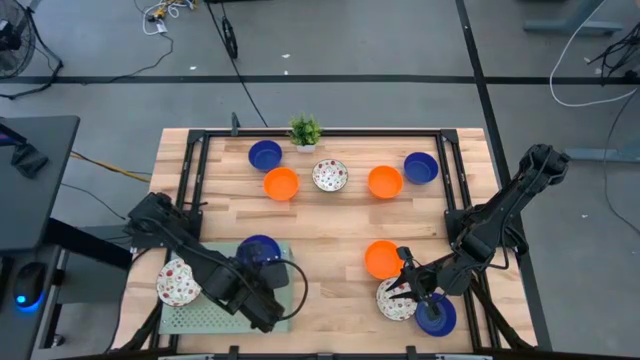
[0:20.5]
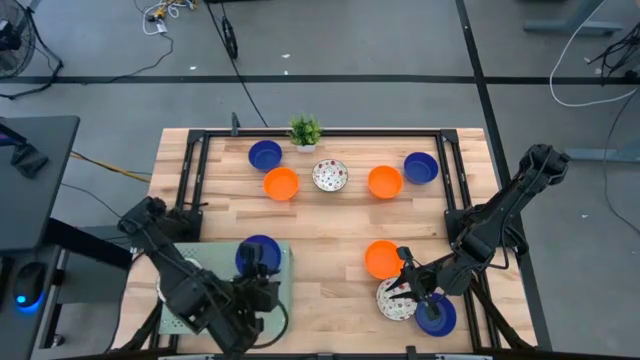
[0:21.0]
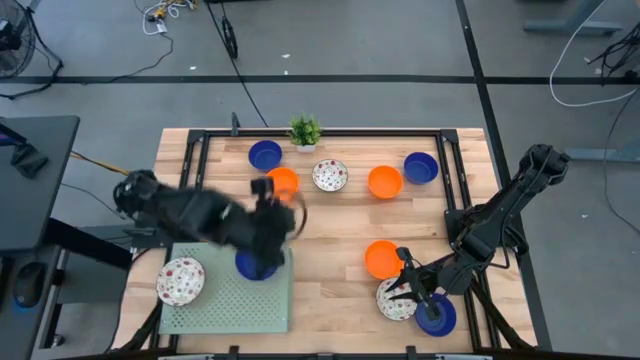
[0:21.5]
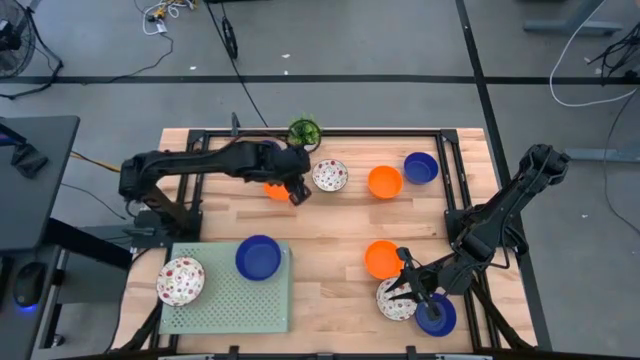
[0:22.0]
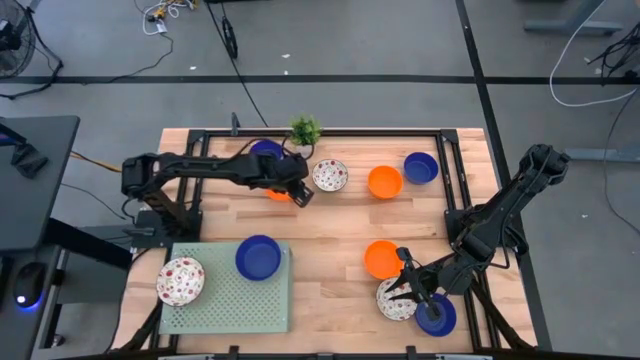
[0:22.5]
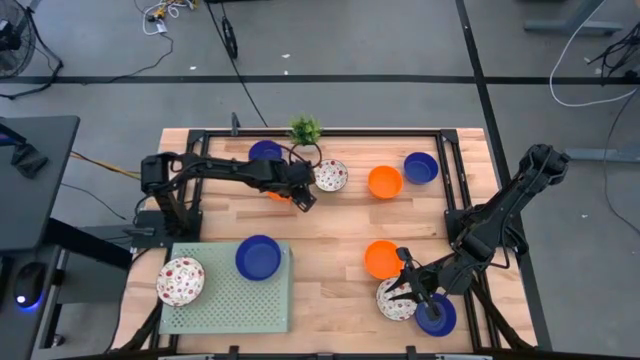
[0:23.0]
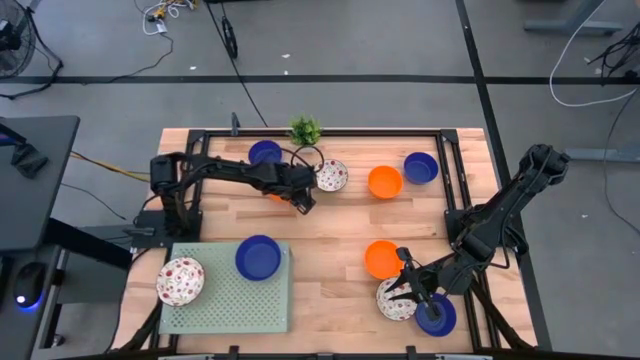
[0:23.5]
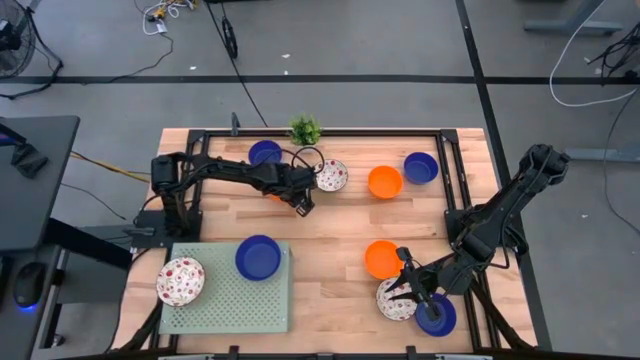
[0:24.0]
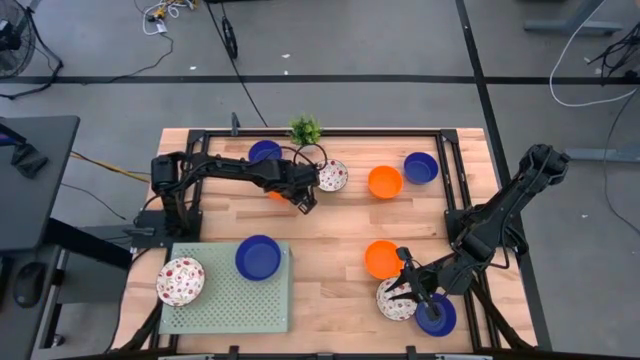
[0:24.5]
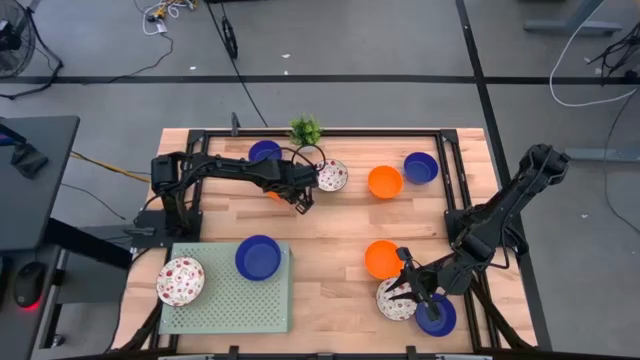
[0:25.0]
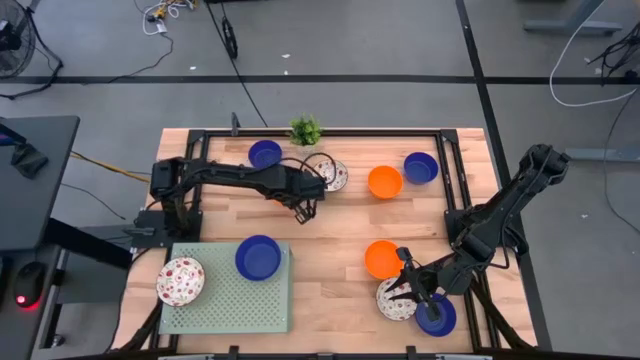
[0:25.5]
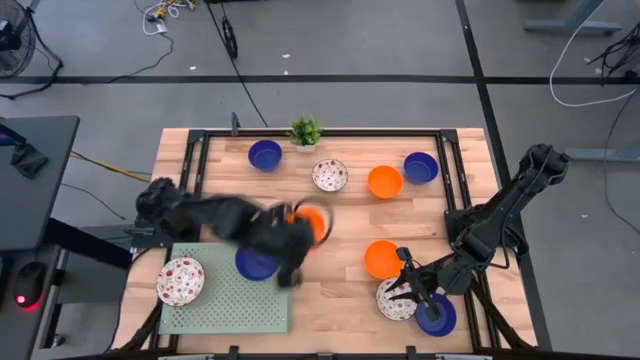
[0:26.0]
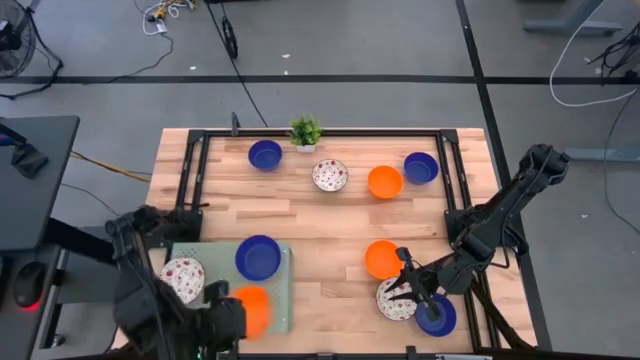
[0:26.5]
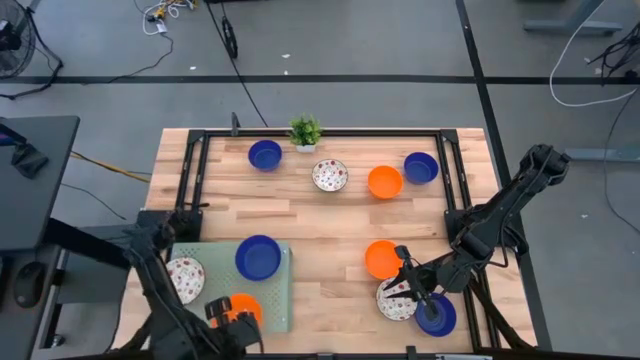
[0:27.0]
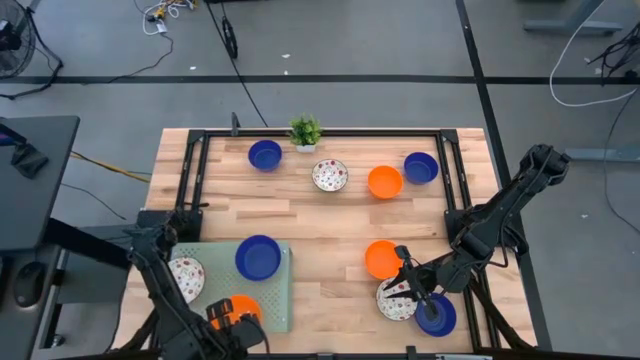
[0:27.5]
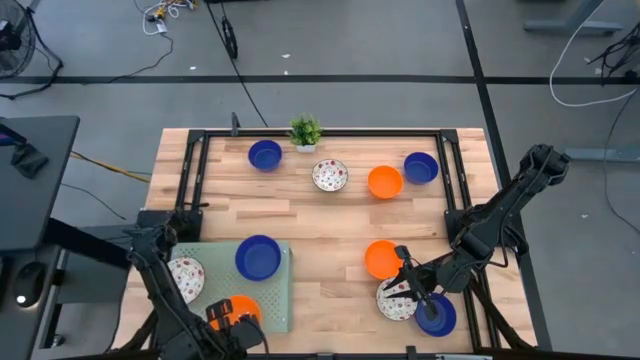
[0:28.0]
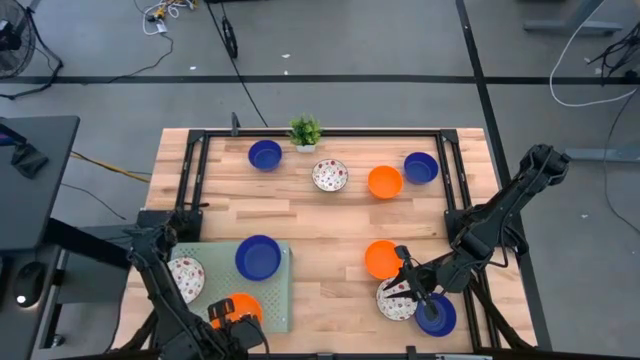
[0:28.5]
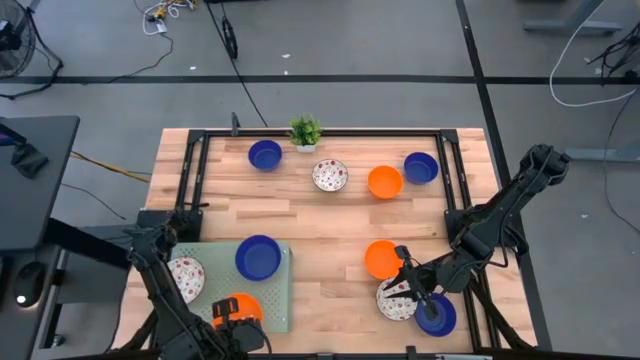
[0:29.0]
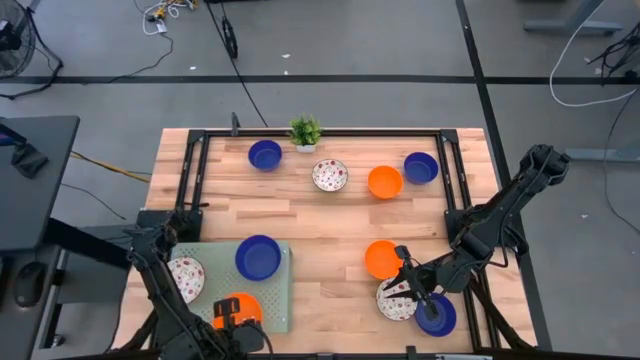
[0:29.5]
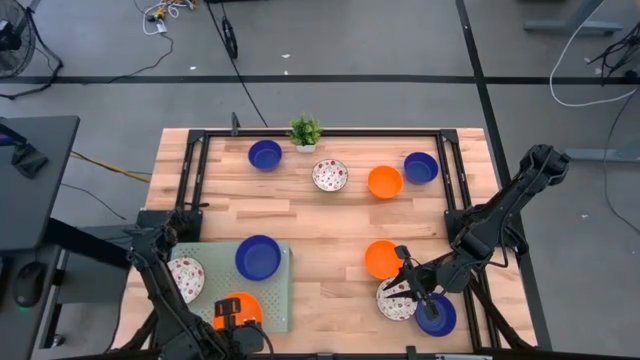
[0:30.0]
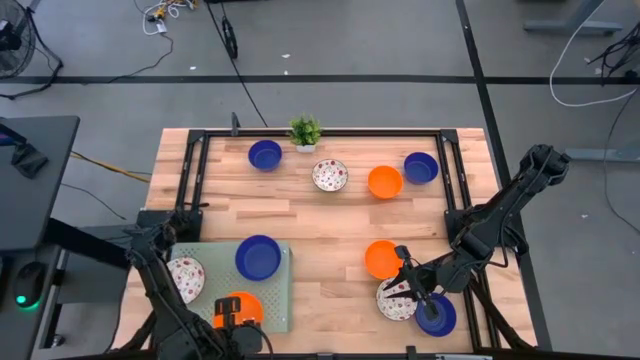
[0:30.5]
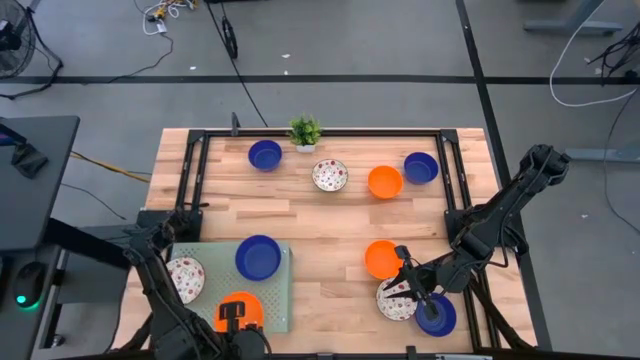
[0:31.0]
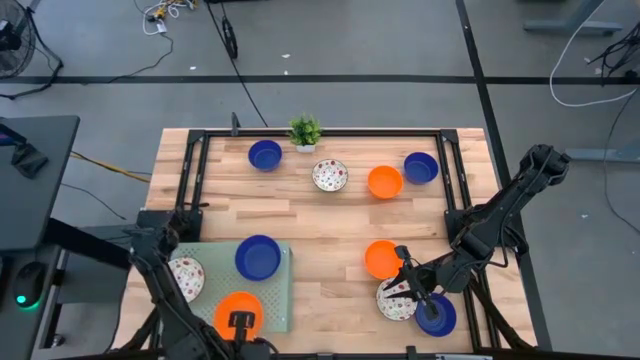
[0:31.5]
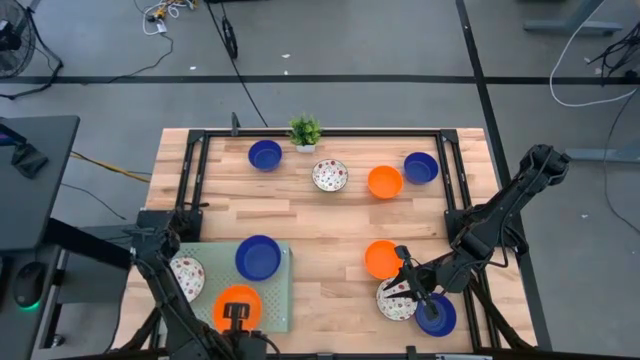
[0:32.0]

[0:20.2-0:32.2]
Task: Pick & Place Mini bowls
Put the orange bowl on the shelf

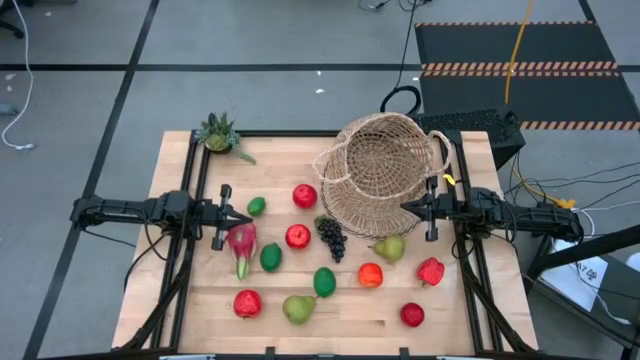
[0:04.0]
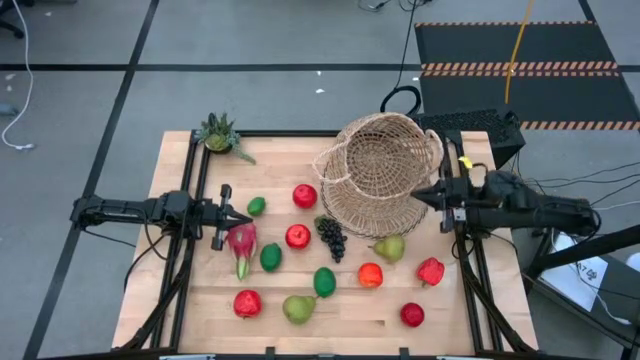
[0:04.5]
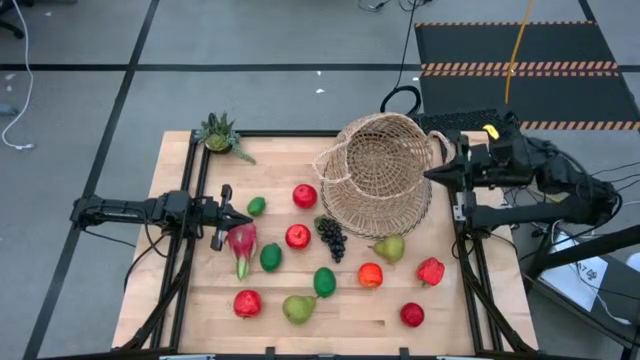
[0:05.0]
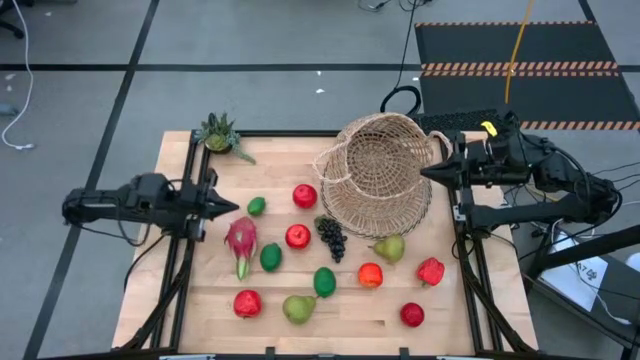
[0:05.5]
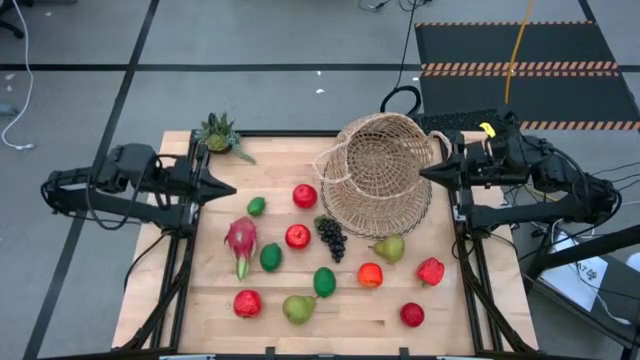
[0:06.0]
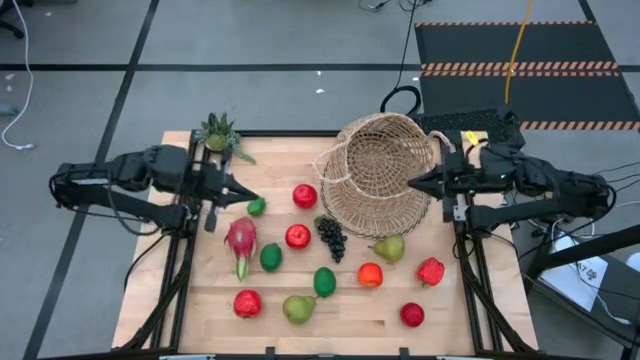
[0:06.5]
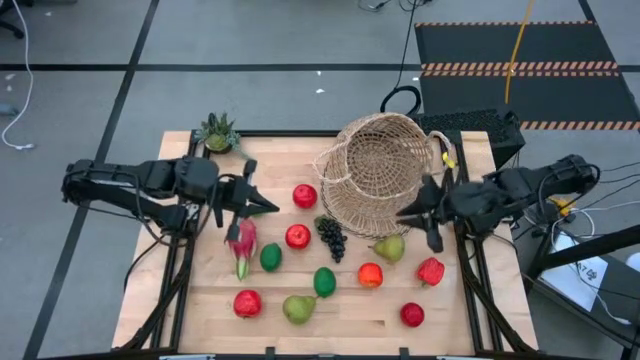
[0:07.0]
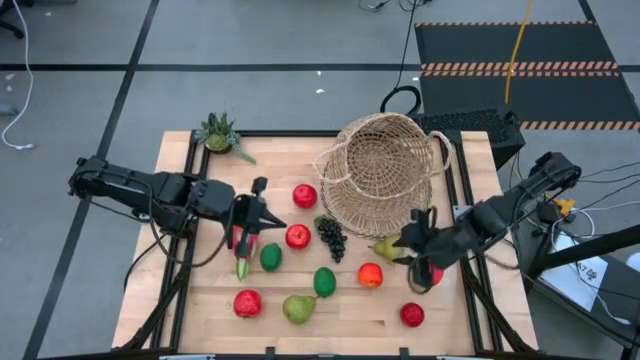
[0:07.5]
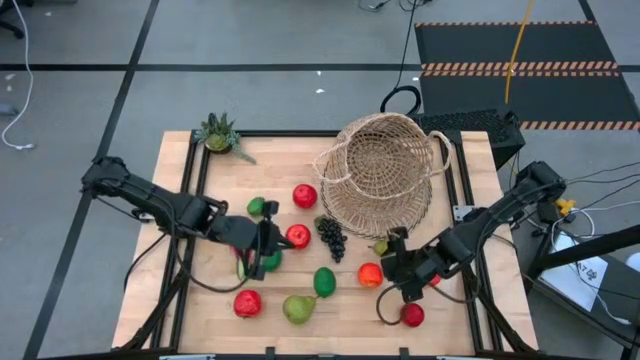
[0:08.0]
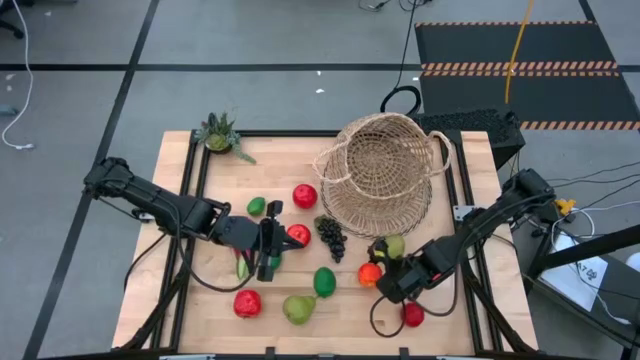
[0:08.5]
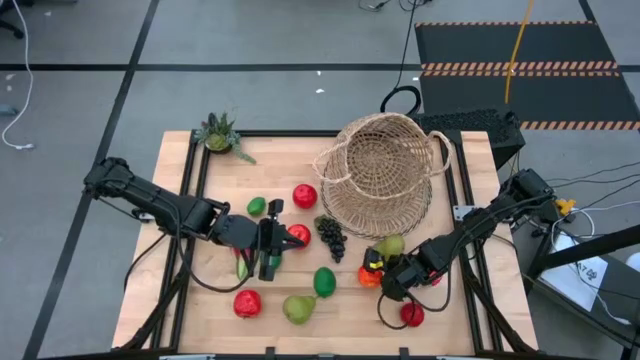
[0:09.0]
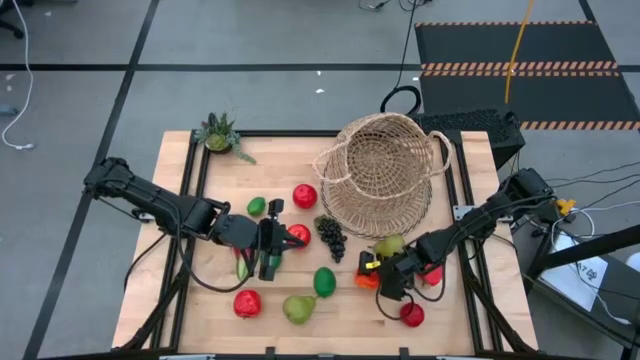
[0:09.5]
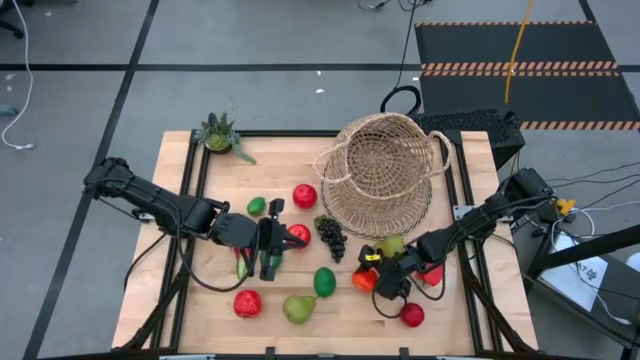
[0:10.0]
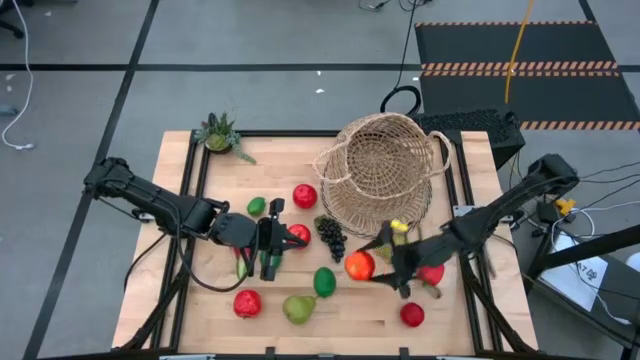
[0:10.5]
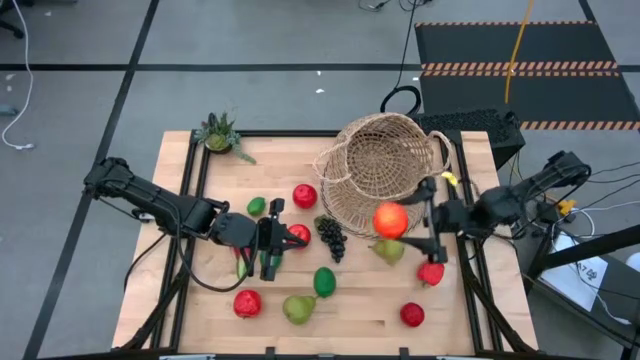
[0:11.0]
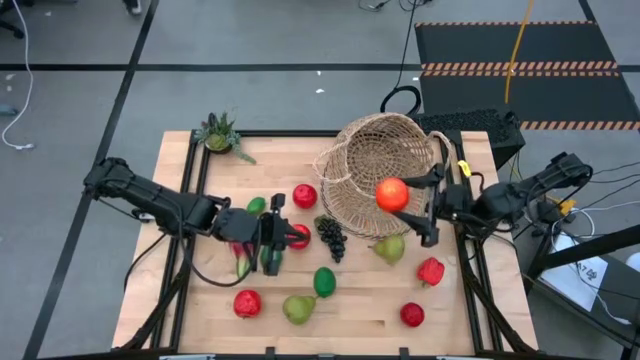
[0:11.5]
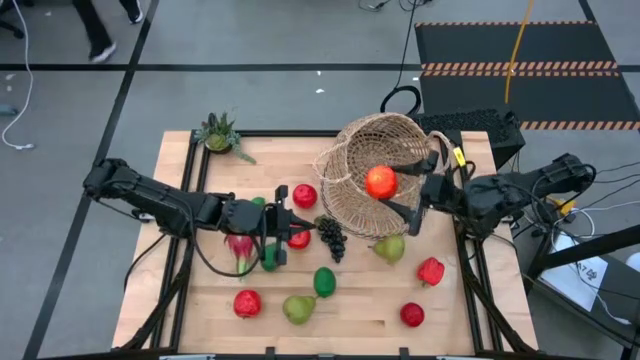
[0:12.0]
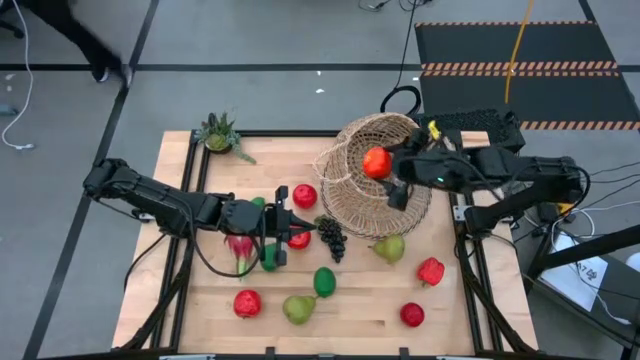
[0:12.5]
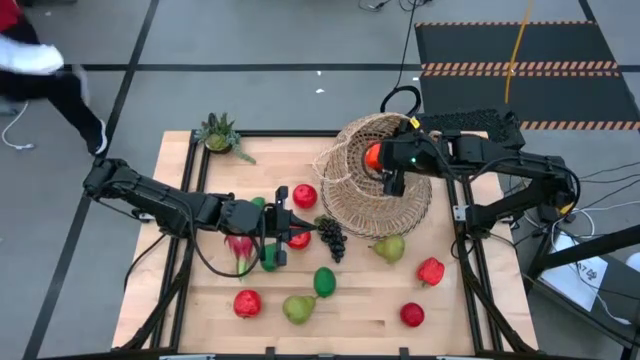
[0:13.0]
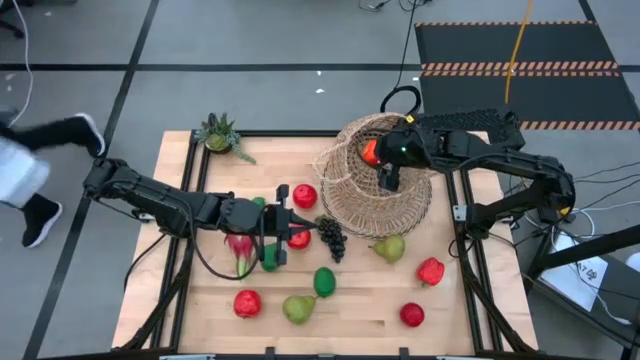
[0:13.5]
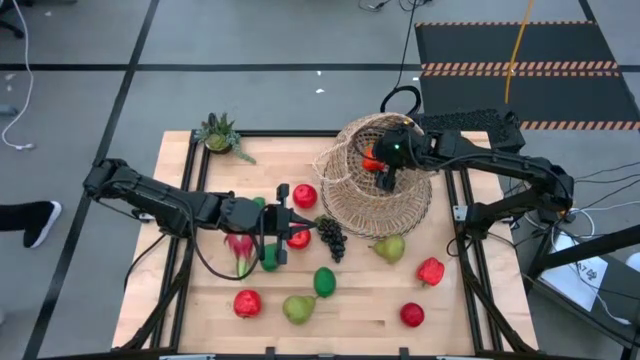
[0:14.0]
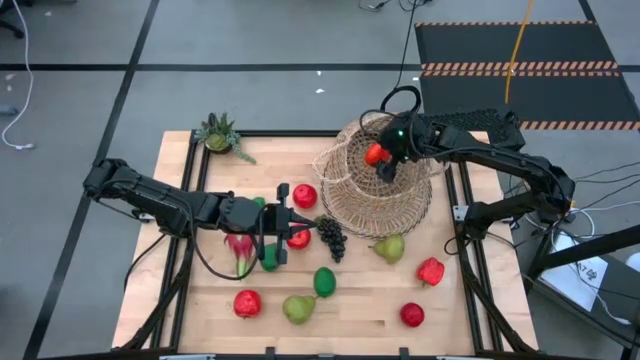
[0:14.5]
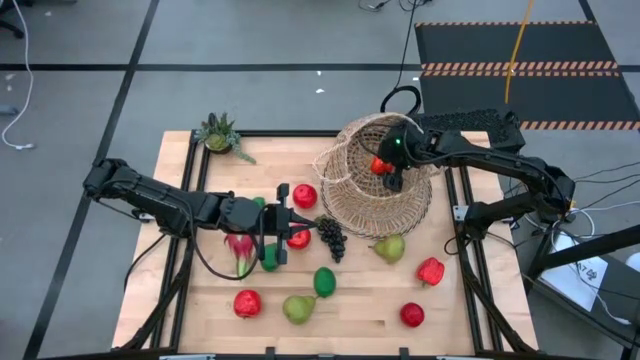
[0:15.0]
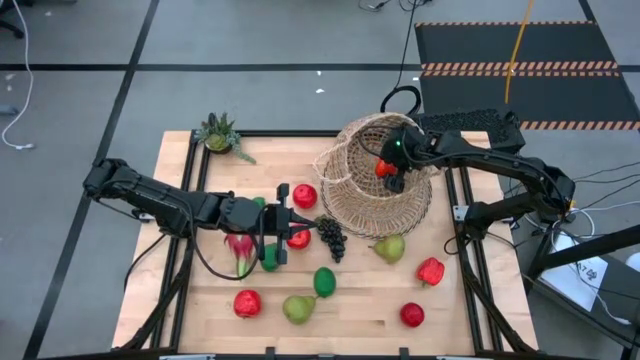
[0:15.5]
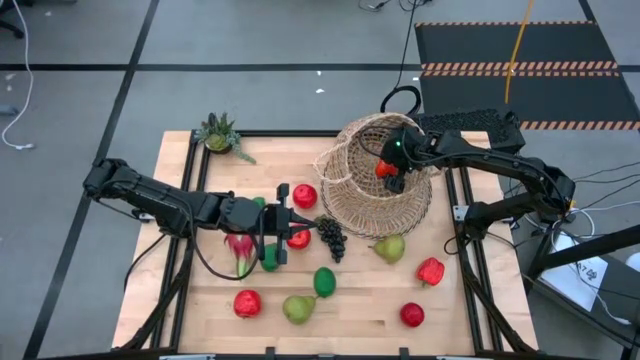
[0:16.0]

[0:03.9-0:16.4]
Task: Build produce basket
Put the red apple into the brown basket
